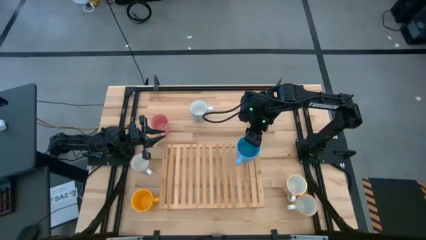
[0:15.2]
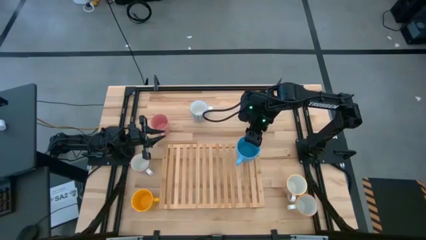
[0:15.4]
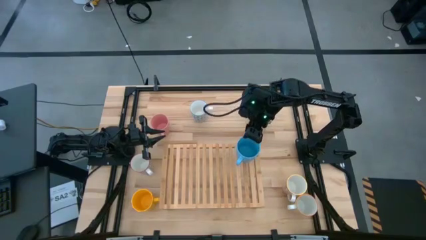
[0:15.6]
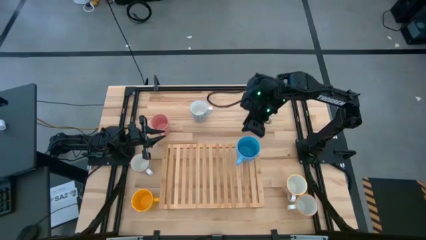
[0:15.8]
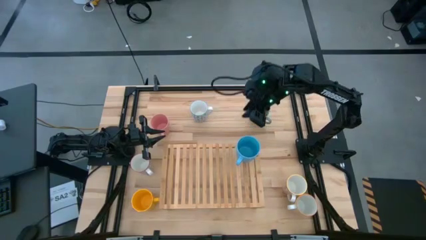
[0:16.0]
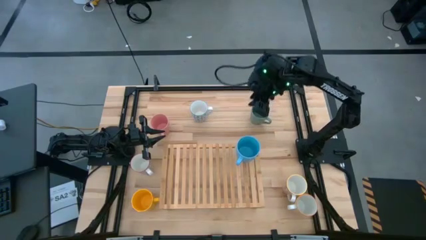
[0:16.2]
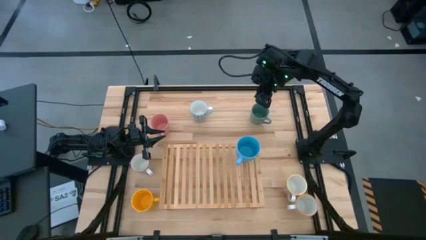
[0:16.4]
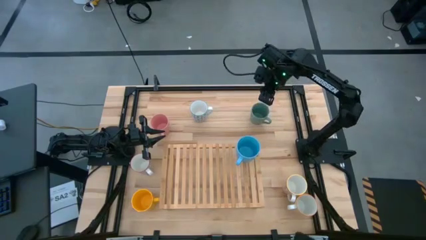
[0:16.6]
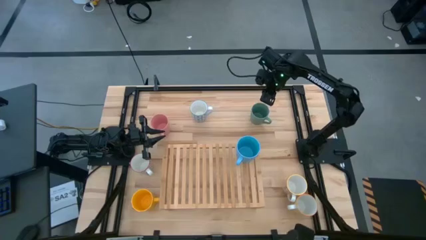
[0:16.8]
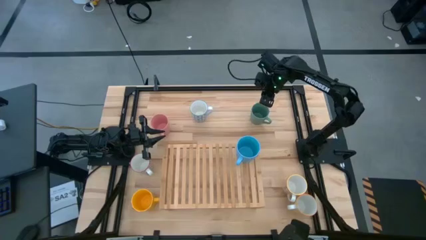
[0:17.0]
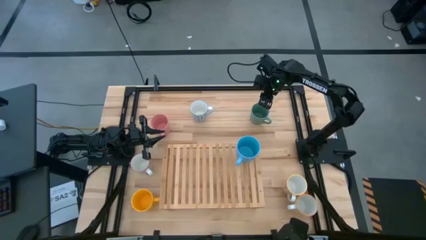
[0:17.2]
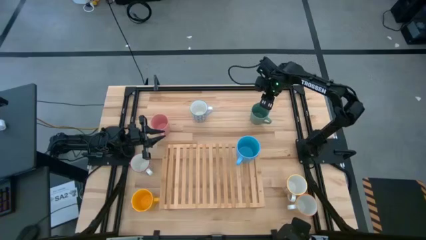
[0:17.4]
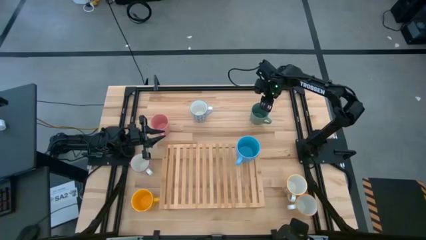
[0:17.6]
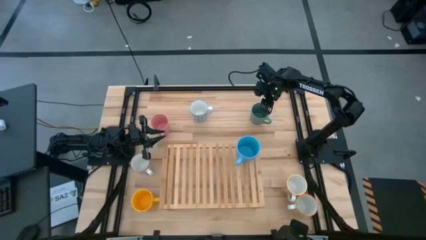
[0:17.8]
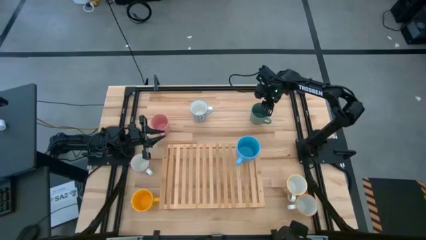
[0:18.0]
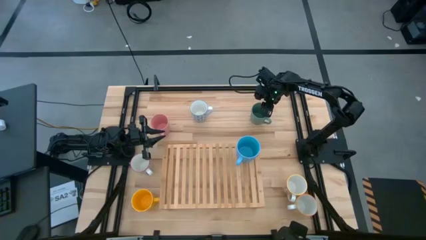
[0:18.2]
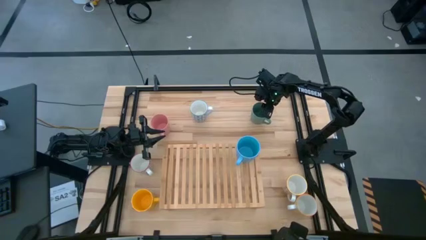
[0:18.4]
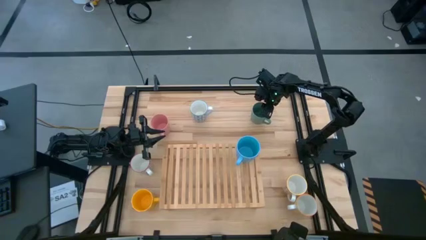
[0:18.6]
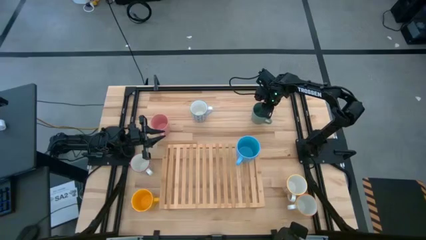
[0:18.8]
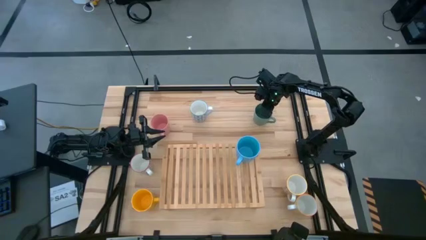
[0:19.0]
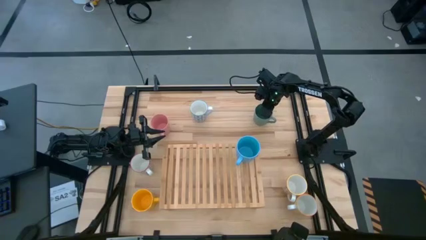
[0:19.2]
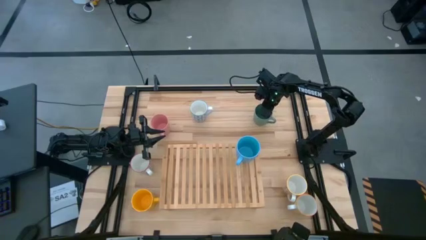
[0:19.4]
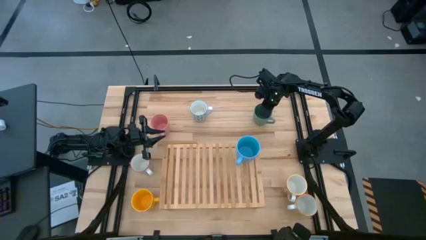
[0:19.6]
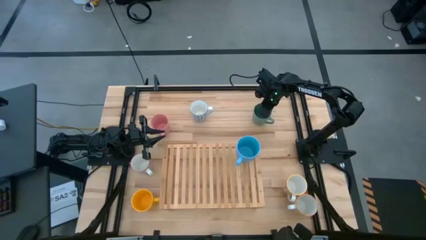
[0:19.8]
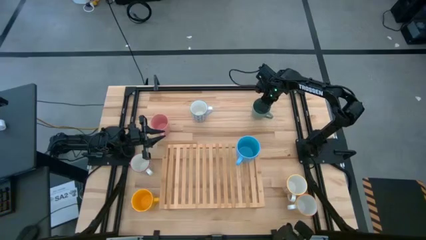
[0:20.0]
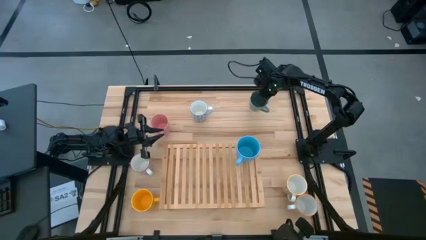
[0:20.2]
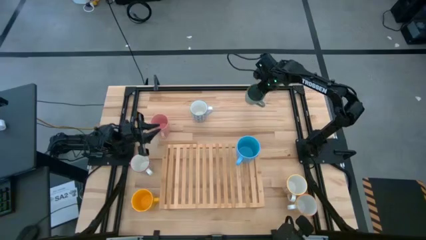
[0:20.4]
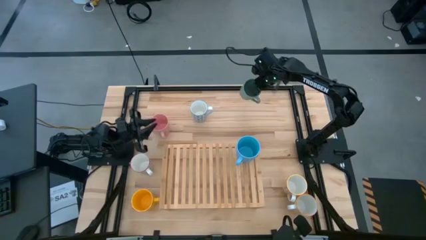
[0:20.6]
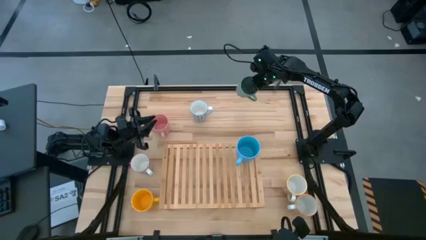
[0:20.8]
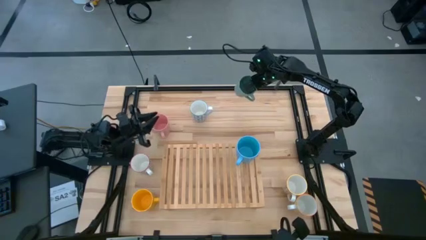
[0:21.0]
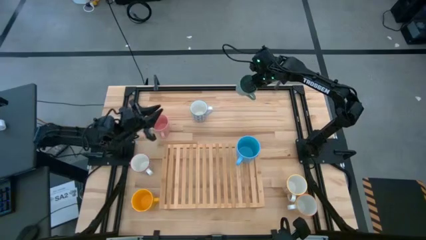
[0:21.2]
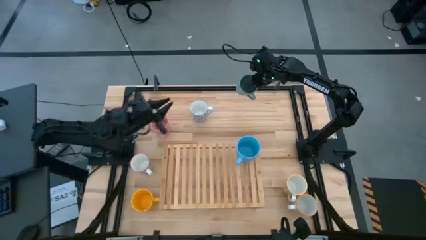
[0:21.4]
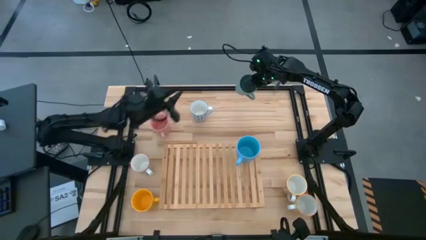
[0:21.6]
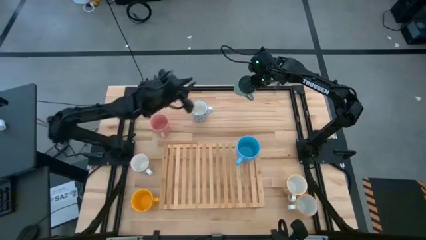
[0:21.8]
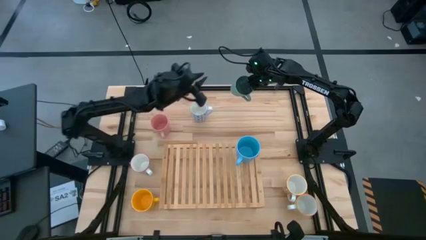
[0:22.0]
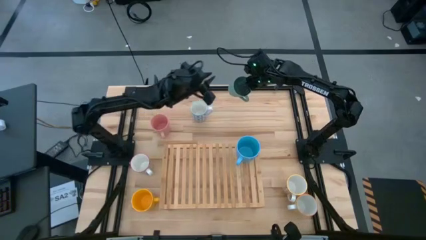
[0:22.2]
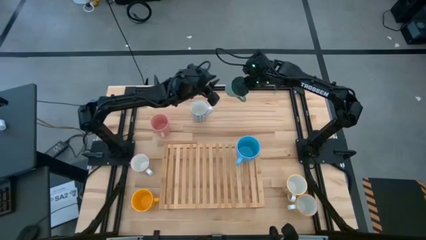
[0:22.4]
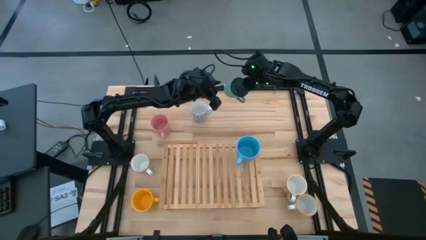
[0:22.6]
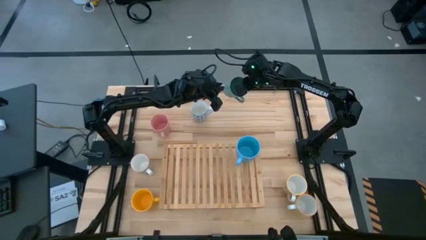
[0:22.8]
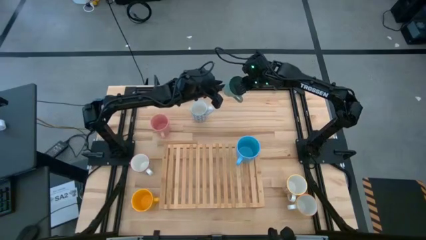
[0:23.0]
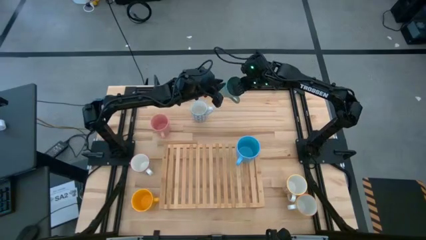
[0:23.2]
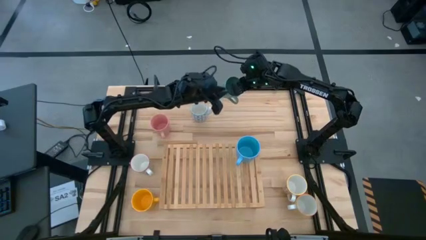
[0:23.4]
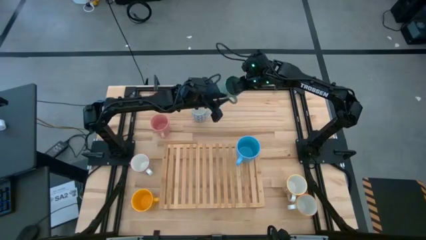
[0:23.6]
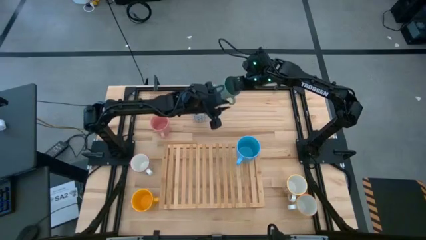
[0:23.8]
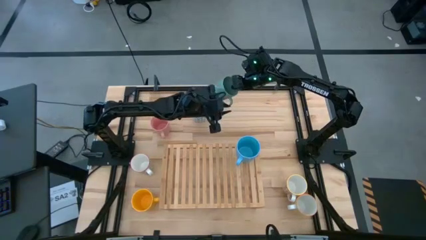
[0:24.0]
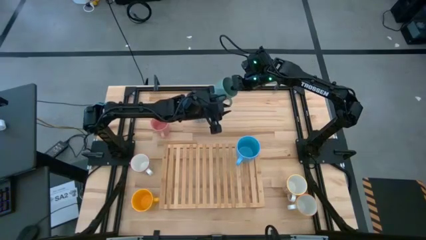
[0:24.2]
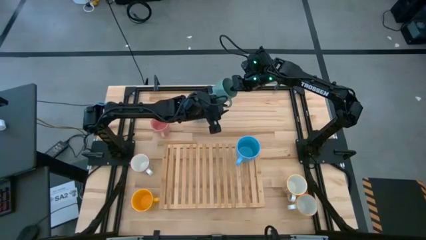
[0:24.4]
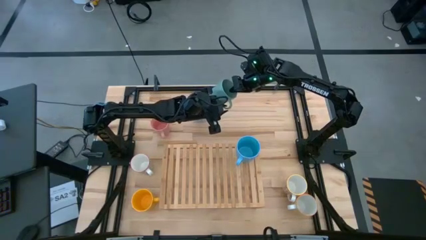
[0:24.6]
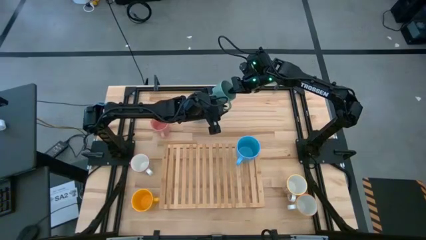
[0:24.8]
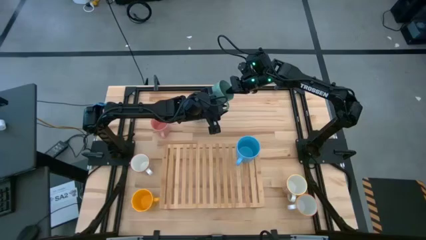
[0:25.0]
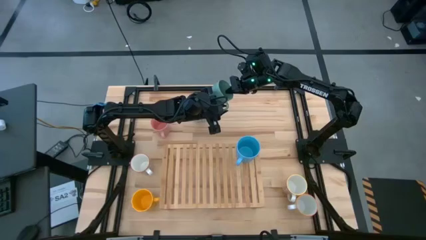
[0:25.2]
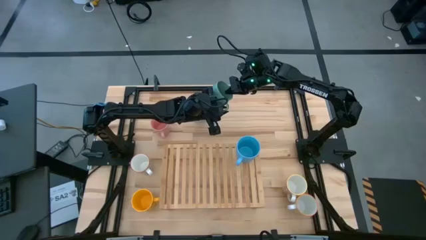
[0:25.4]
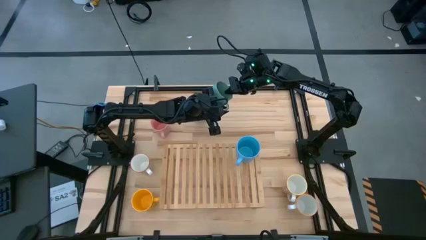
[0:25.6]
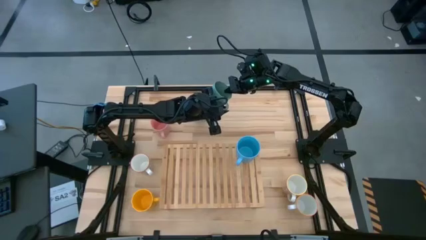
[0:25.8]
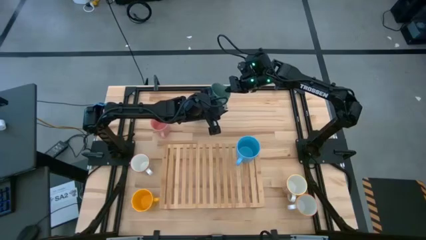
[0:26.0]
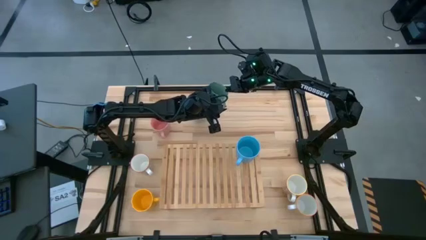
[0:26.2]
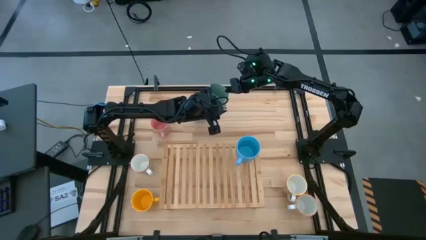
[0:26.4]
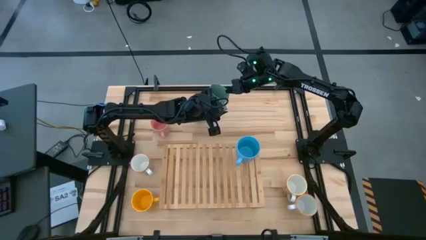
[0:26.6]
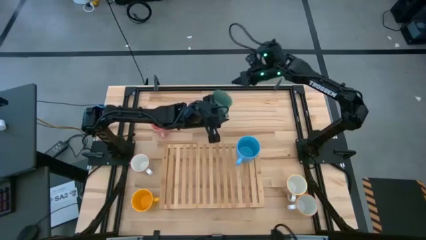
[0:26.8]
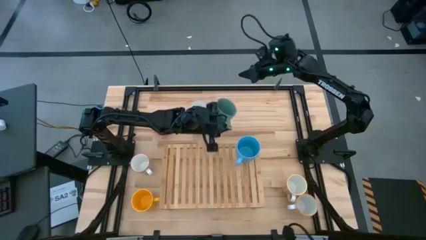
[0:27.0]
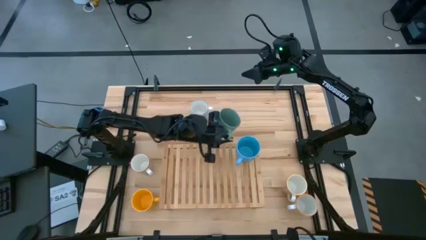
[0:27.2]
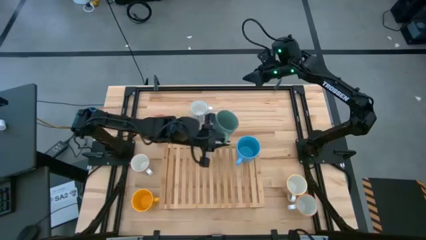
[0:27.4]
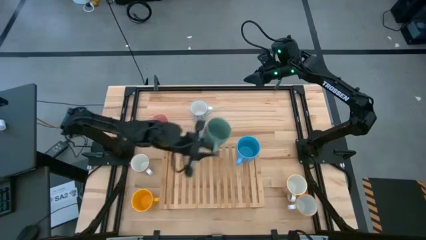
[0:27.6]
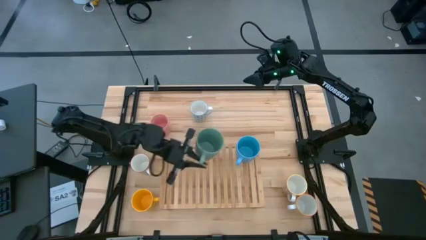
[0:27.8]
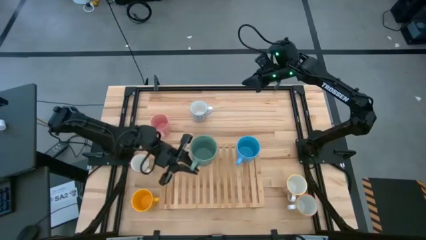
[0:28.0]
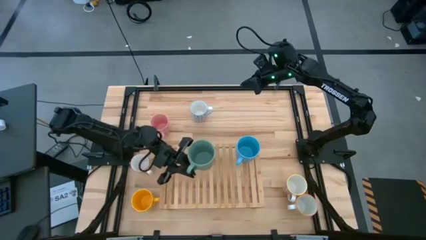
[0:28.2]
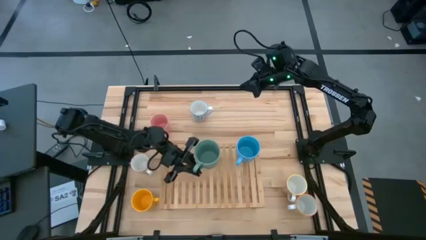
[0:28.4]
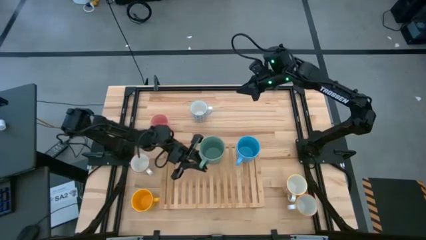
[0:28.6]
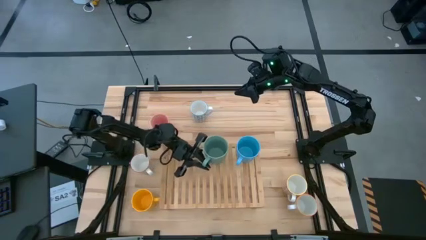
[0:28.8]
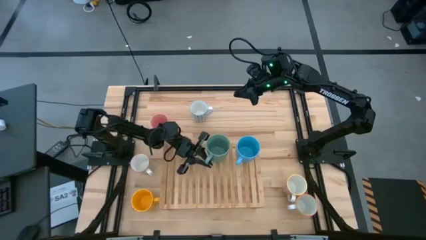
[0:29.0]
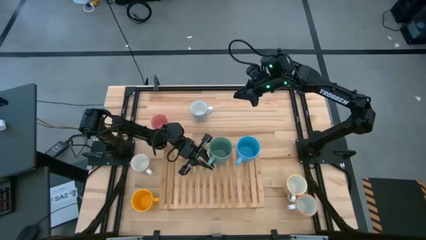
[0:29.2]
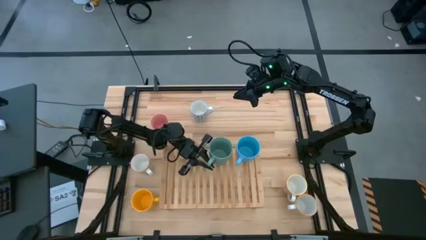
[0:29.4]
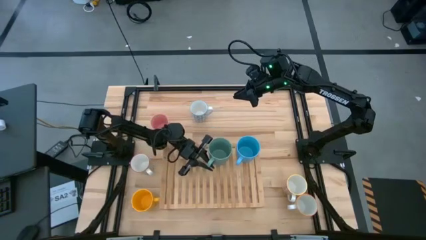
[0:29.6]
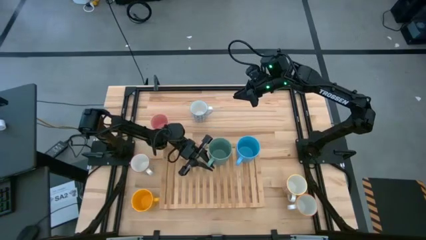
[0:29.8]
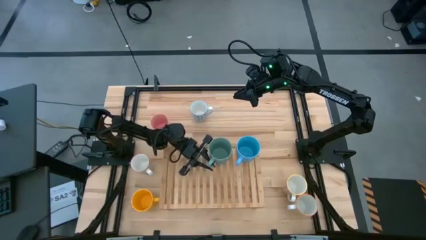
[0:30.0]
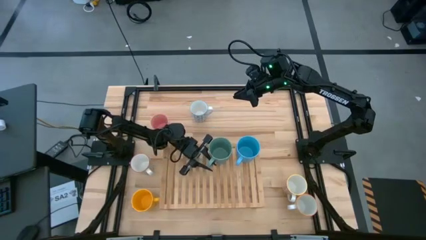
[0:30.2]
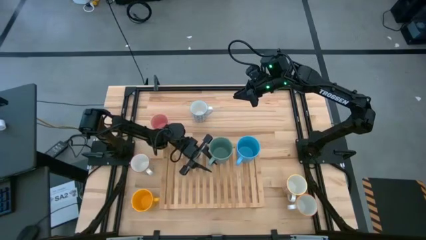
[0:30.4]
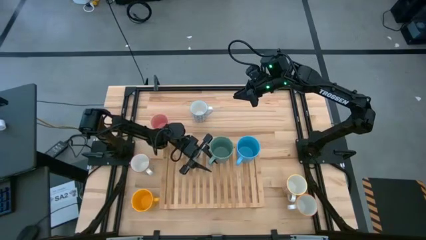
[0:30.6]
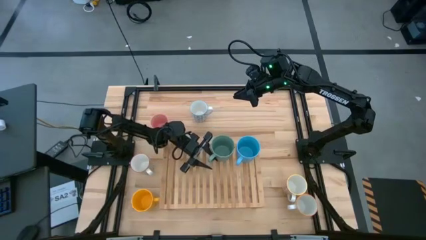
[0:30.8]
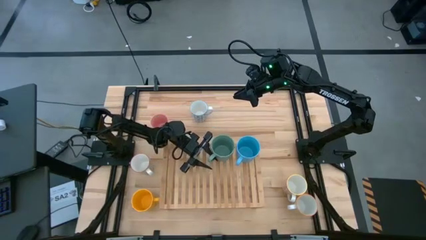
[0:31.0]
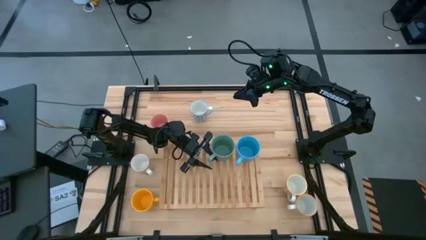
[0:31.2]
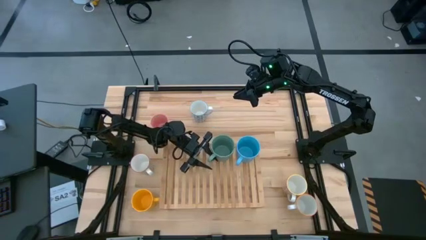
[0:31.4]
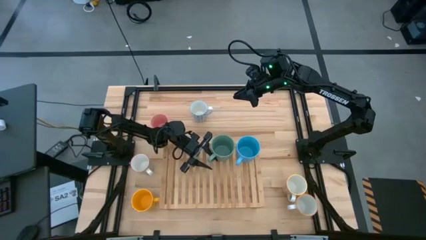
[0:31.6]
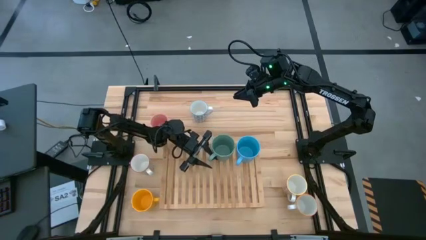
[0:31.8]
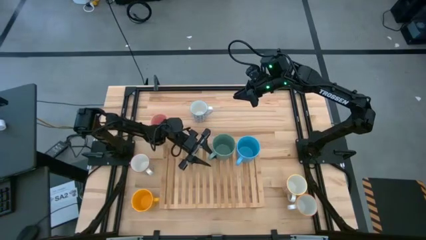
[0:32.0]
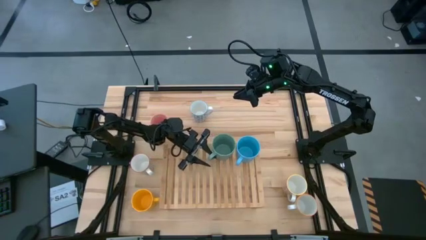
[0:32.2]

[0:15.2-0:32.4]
Task: Place coffee mugs
Put the green mug on the shelf
